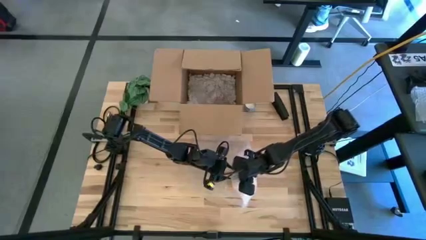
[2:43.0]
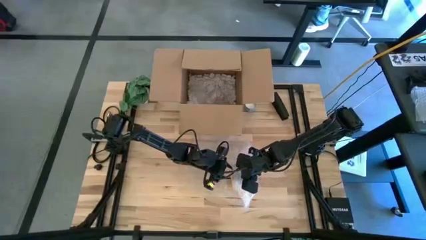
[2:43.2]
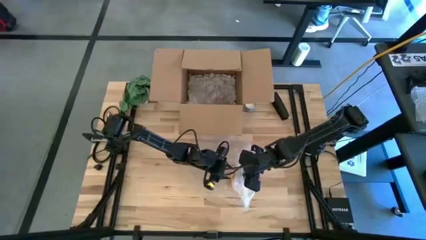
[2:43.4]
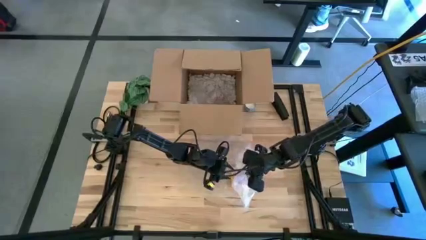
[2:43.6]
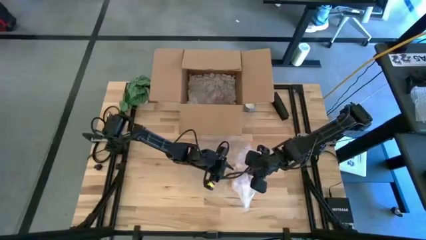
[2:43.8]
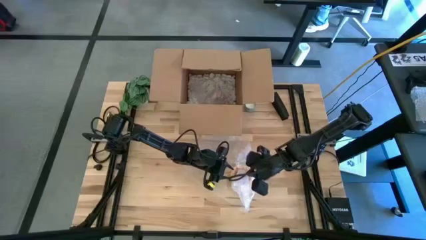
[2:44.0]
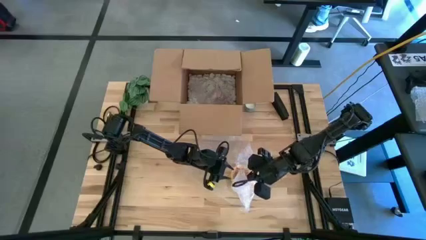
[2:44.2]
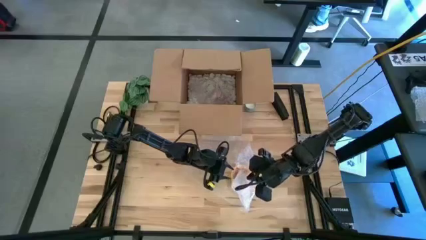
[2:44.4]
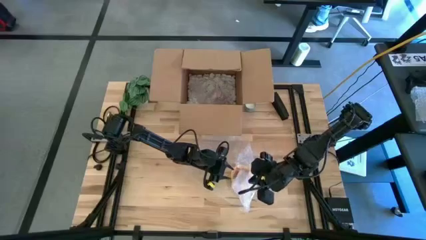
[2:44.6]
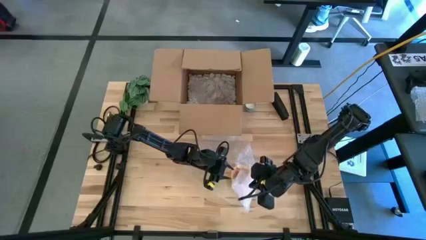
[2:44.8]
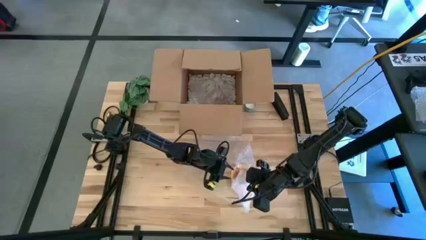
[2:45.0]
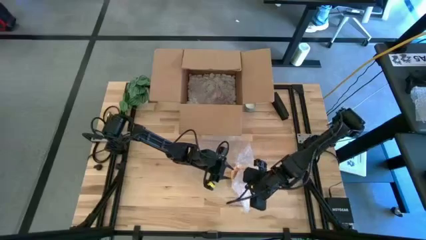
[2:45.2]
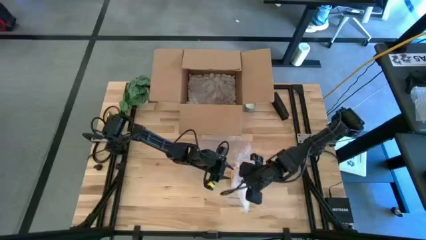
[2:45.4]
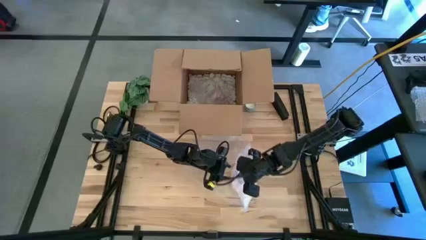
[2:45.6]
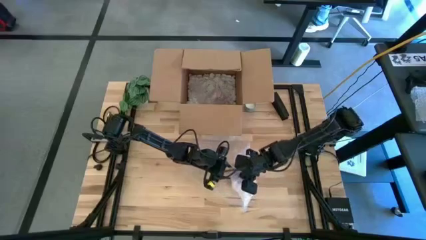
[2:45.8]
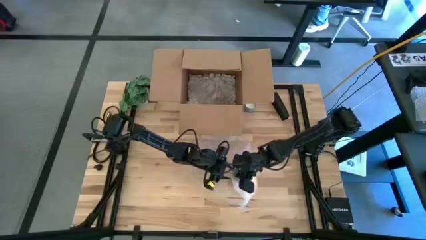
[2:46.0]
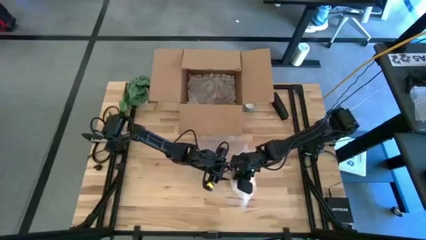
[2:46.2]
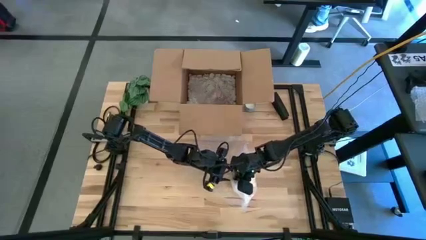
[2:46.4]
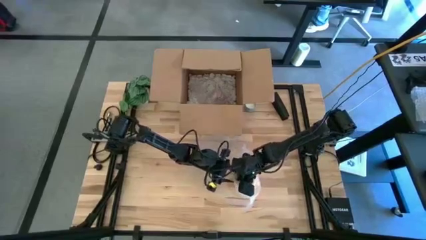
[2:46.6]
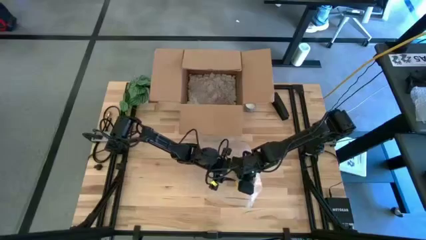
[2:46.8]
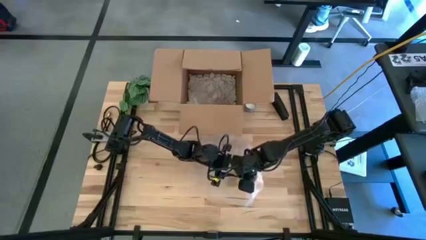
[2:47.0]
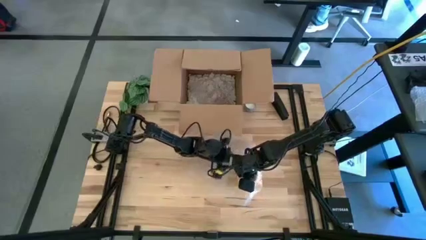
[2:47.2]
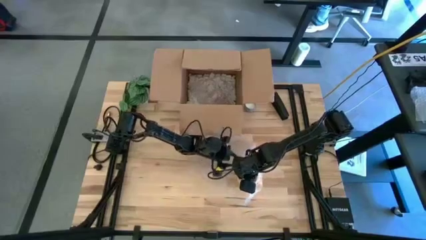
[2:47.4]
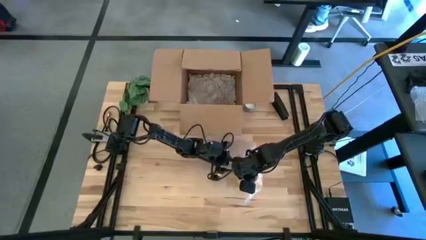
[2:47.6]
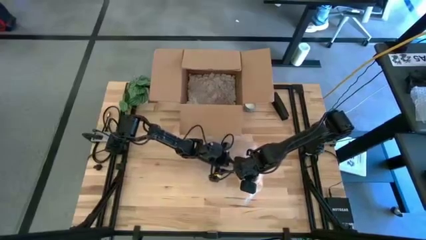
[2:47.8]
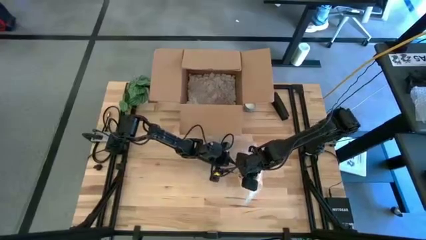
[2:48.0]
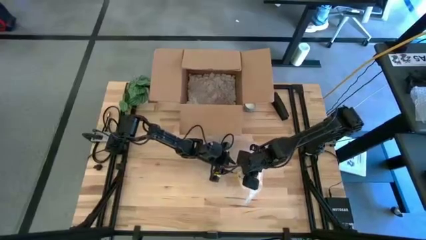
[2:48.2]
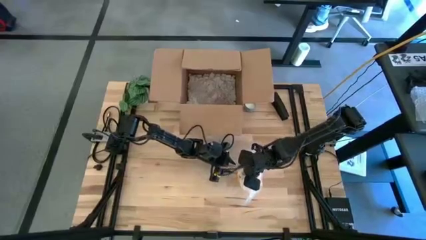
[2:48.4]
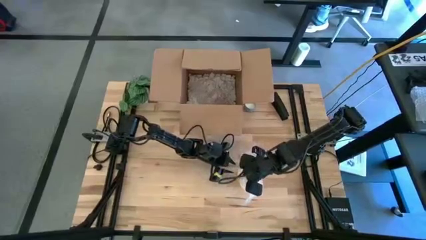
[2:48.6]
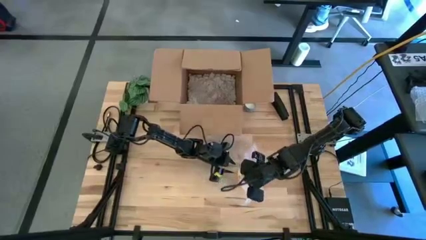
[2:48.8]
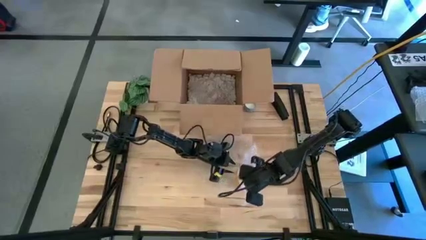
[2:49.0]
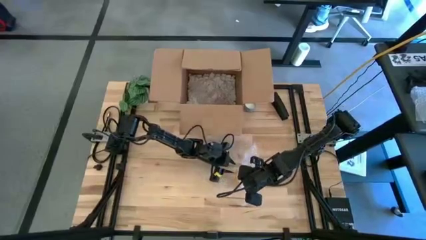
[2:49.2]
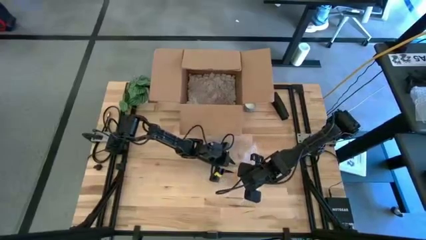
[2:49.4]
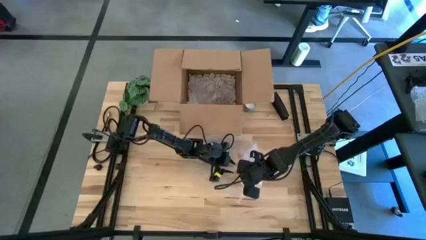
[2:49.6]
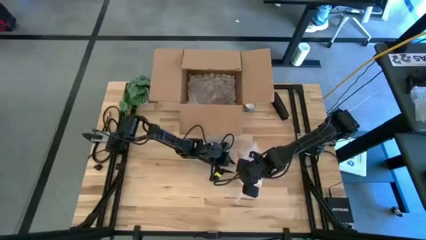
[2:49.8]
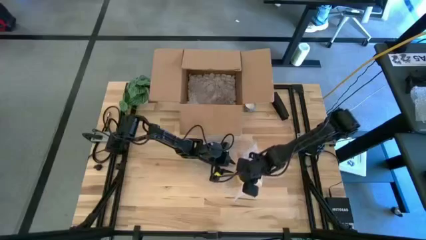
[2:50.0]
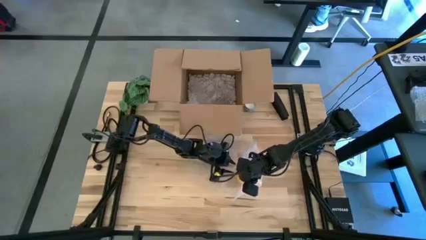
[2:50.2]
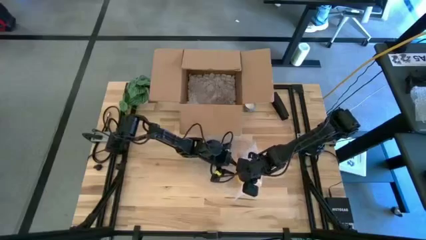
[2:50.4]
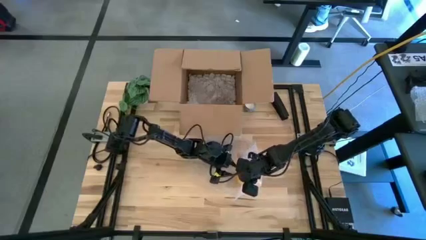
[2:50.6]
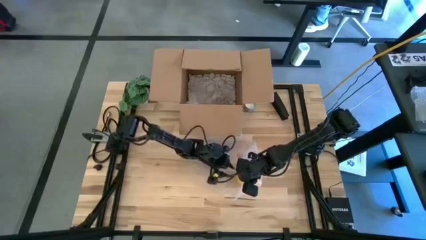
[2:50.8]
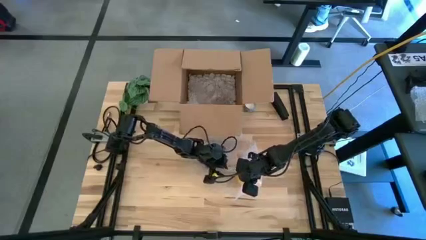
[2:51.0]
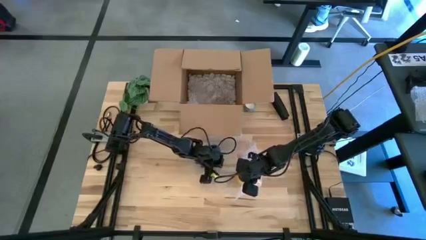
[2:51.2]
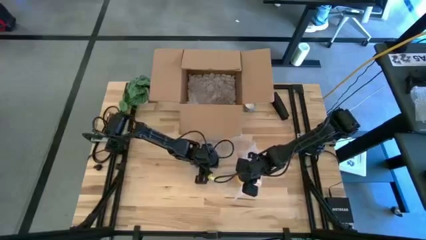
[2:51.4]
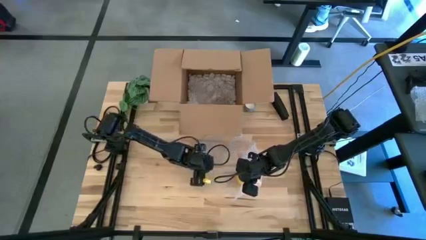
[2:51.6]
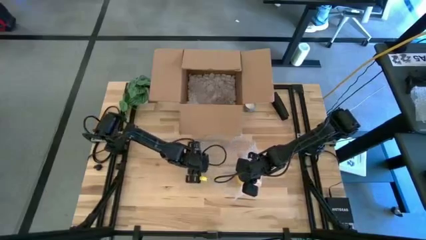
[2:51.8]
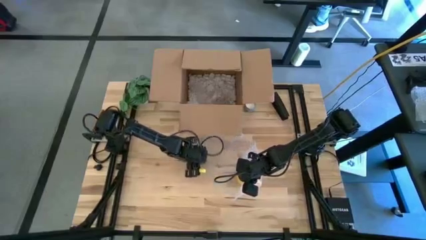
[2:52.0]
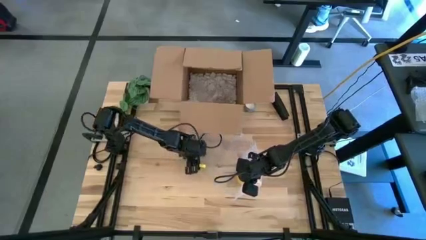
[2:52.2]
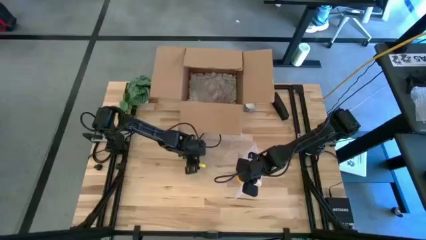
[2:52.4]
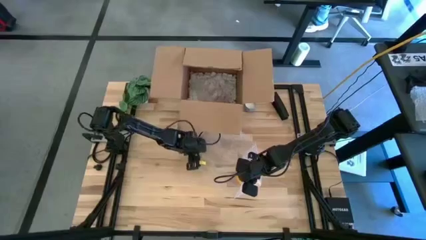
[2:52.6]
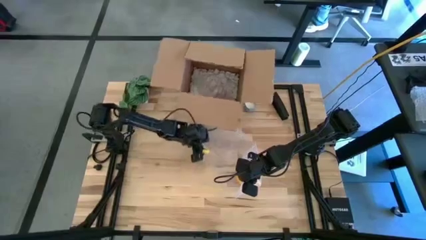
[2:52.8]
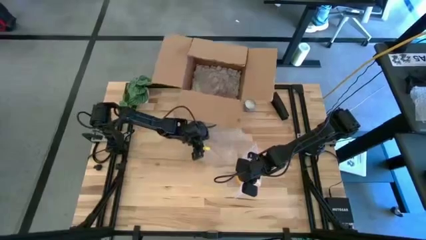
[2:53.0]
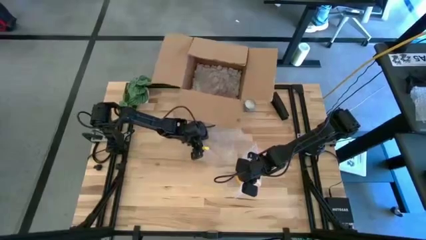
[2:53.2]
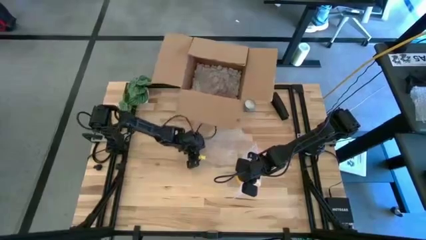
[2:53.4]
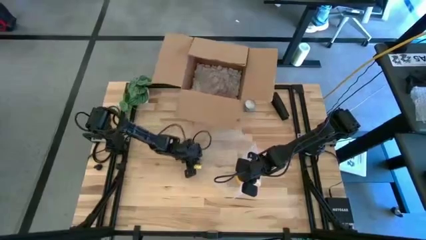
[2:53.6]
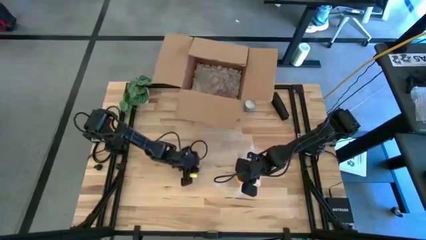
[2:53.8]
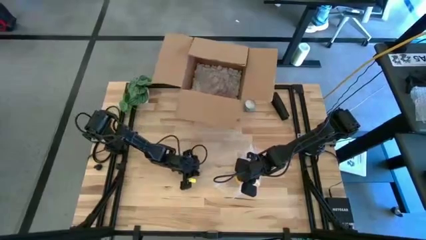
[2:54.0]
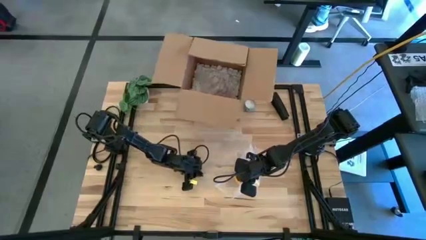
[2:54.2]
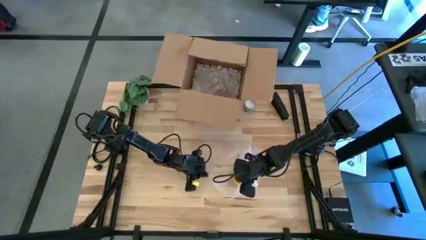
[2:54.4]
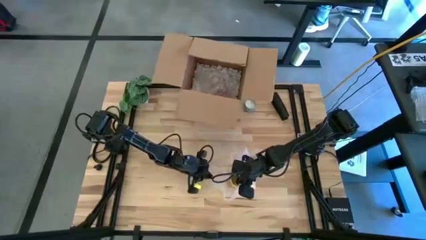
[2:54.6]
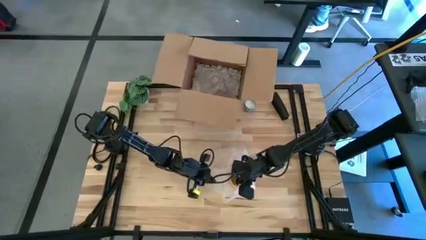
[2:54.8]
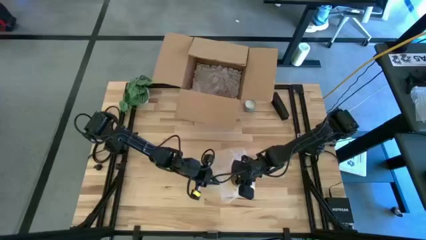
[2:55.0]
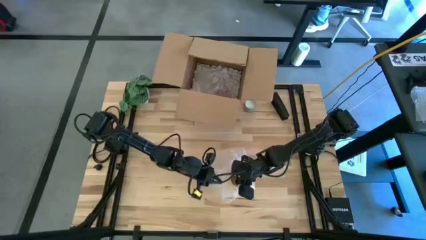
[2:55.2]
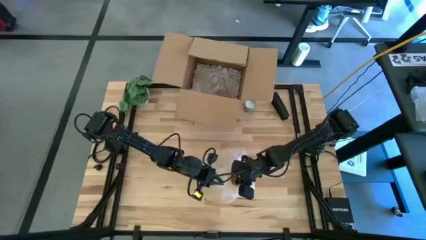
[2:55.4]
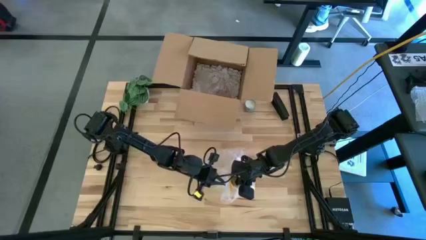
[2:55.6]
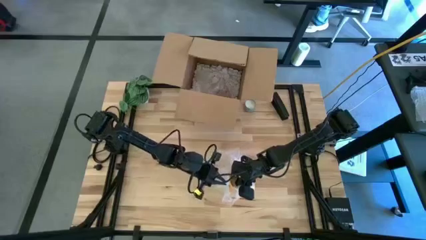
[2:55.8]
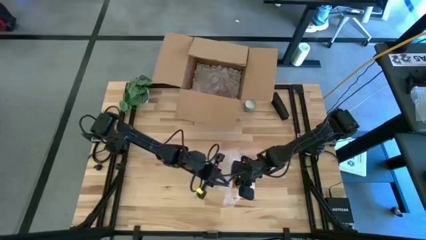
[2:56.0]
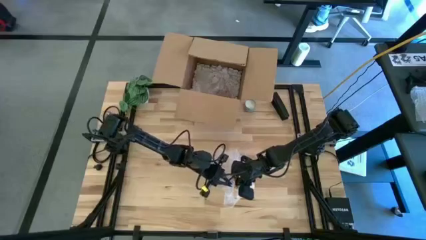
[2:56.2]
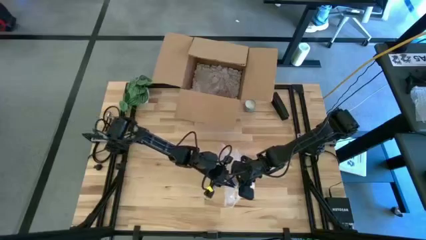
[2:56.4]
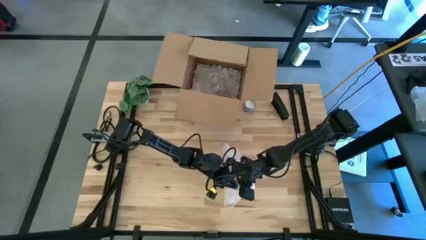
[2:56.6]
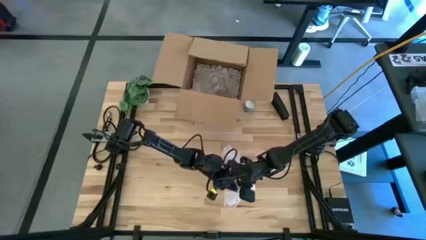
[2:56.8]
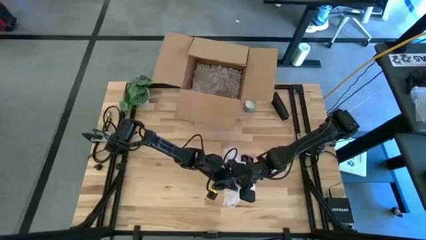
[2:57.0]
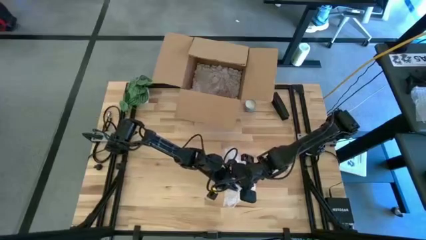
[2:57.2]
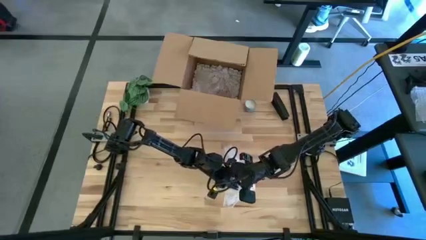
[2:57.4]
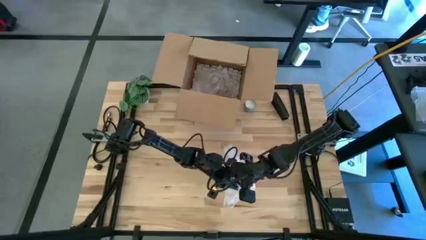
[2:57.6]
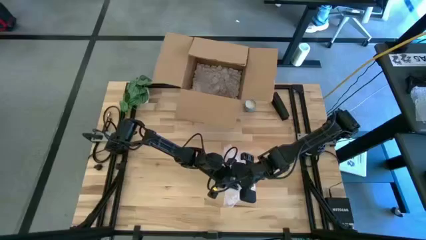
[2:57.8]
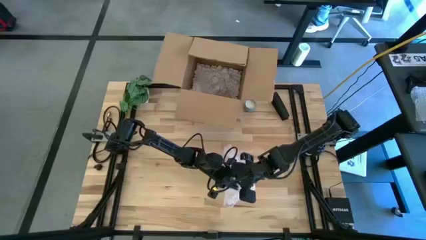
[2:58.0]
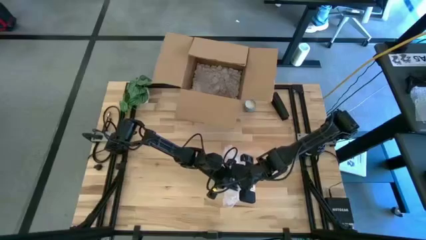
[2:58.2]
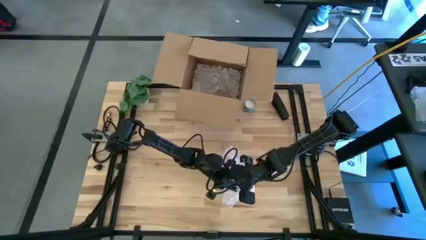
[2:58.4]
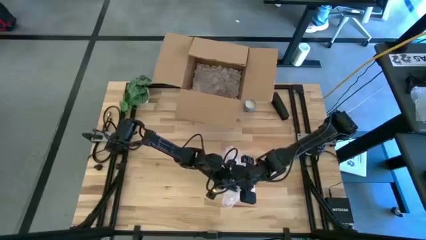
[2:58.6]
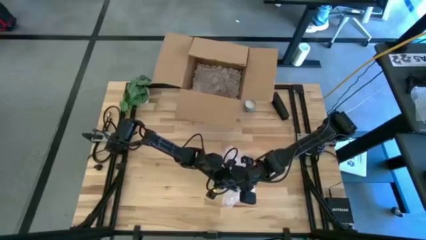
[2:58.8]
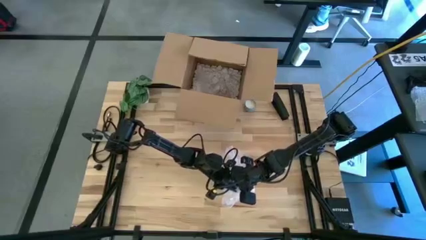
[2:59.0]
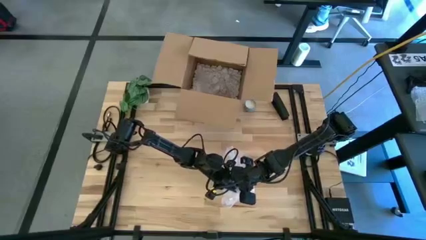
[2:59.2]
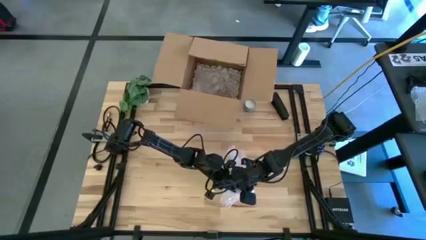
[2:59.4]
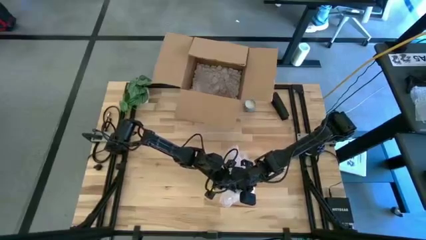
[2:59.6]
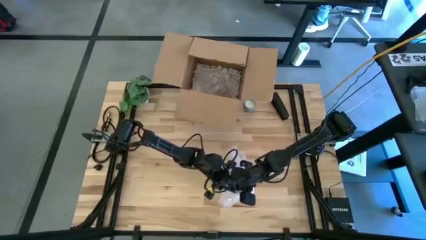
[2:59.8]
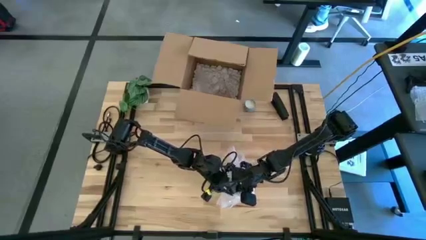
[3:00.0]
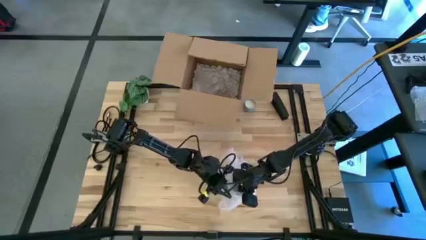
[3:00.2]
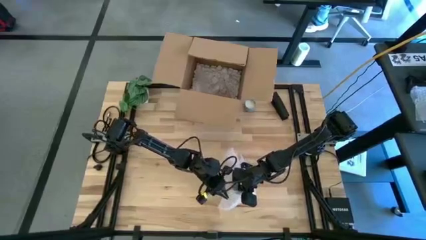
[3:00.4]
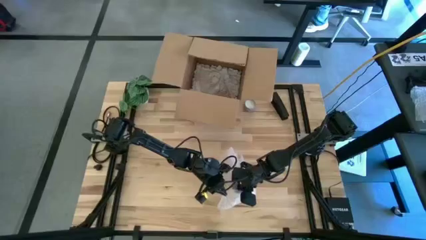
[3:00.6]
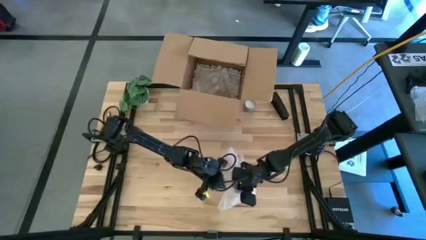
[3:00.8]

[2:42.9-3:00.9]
Task: wrap mug
Wrap the yellow mug with the bubble wrap
